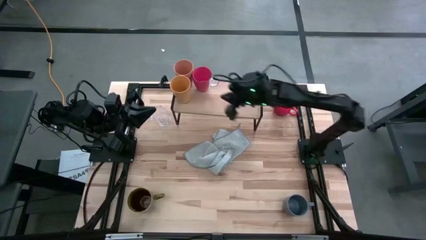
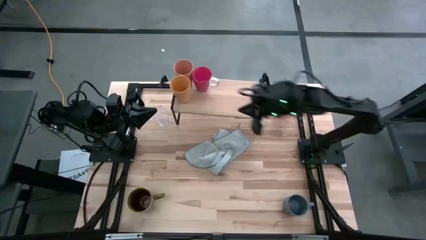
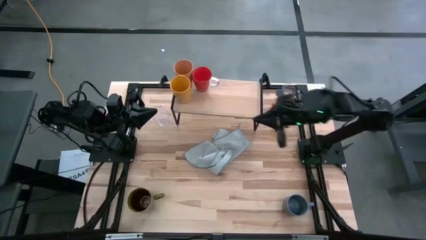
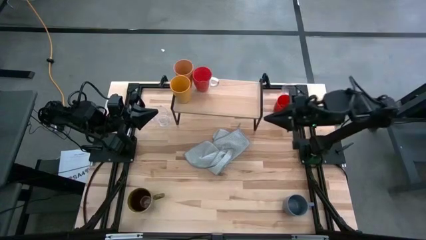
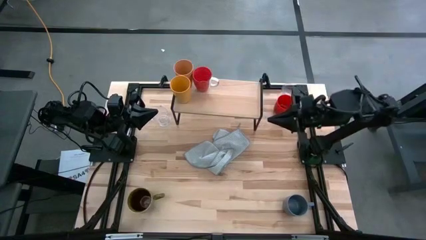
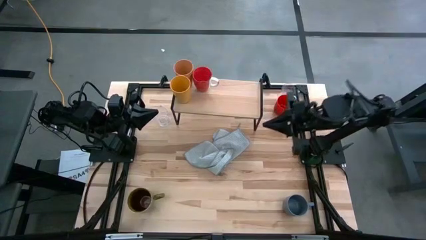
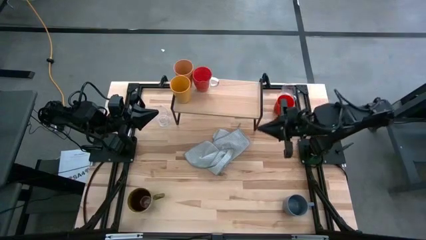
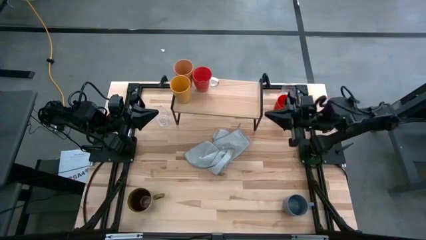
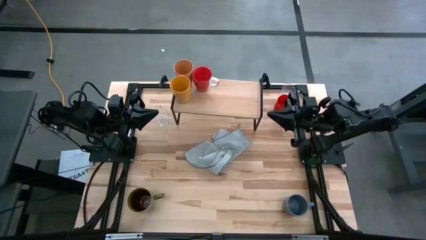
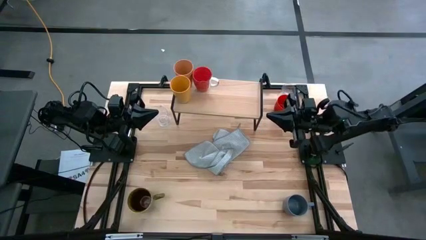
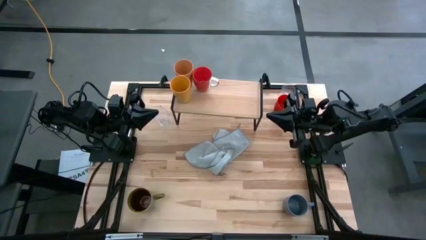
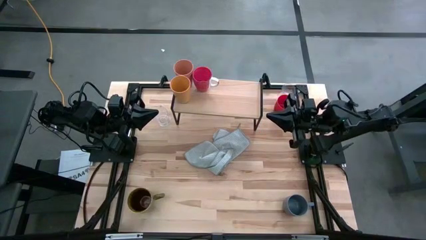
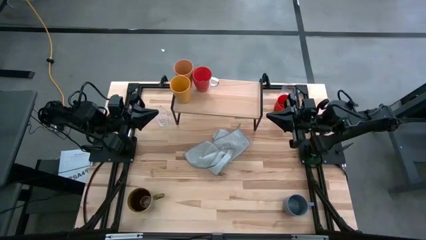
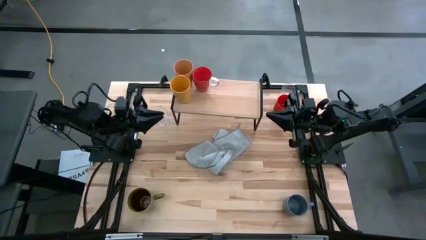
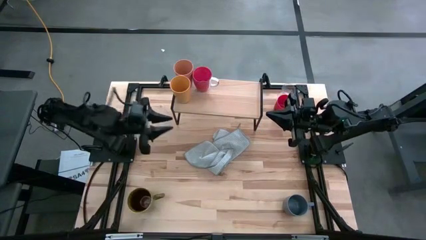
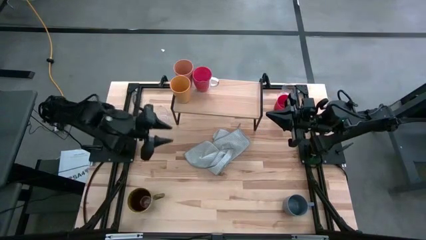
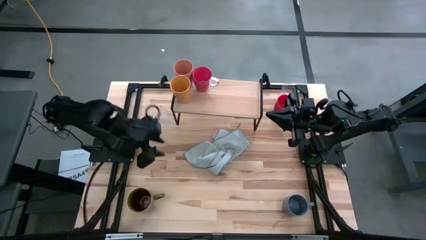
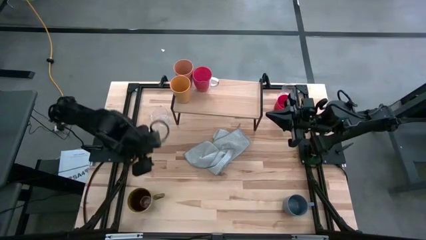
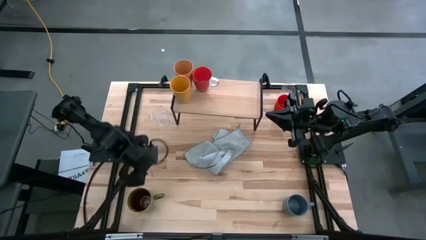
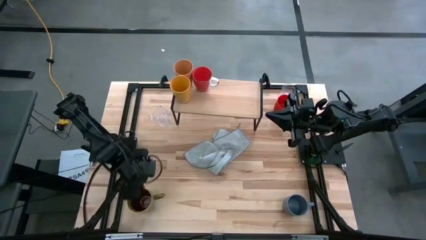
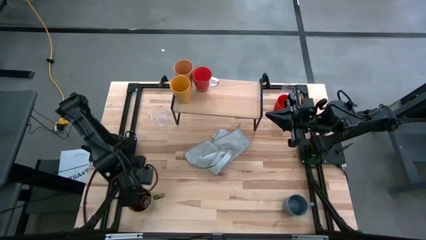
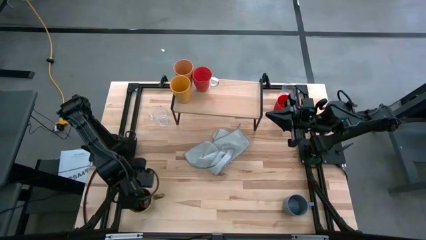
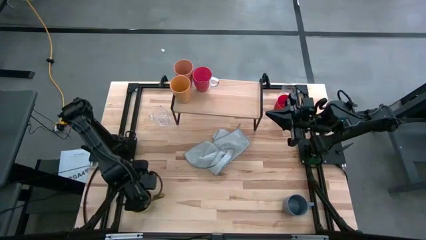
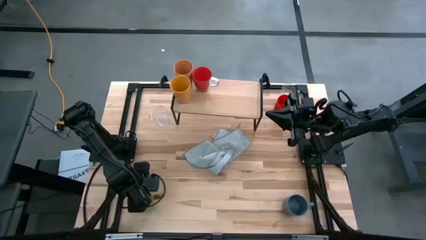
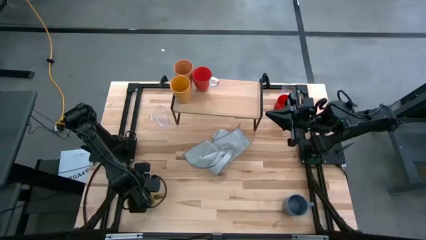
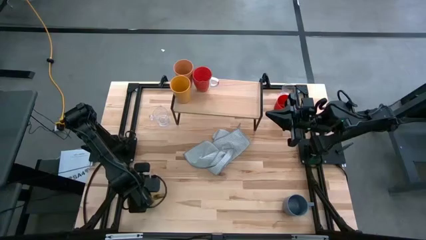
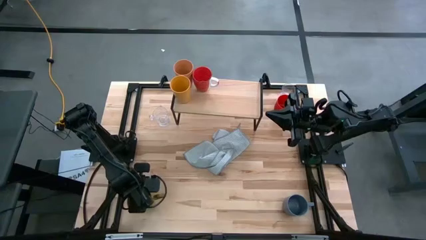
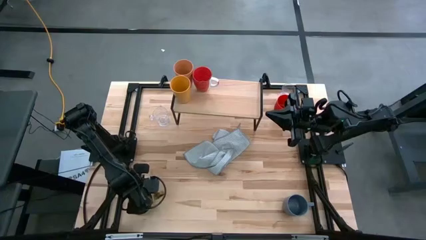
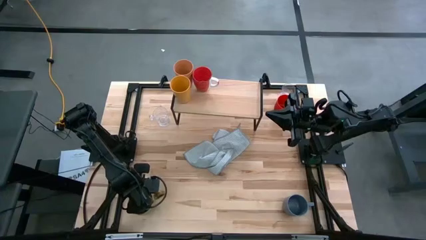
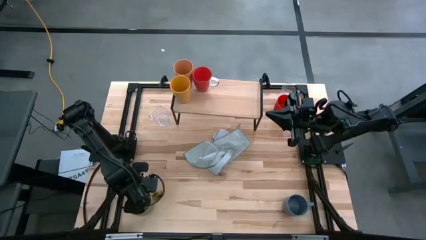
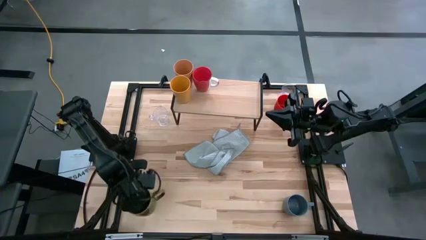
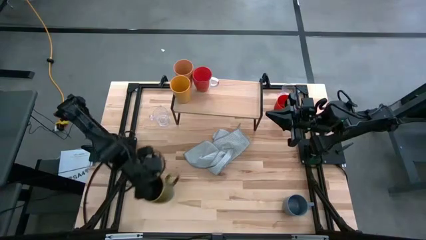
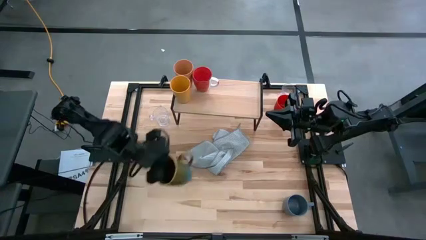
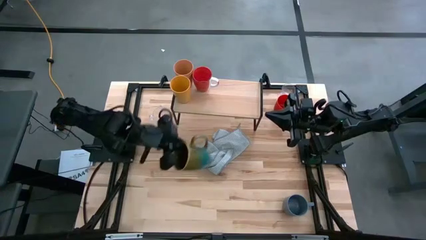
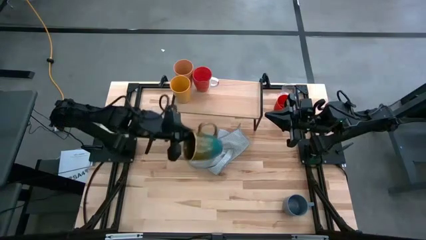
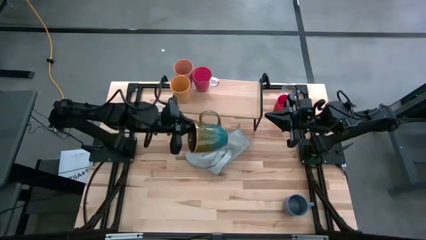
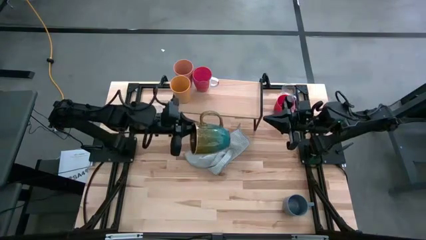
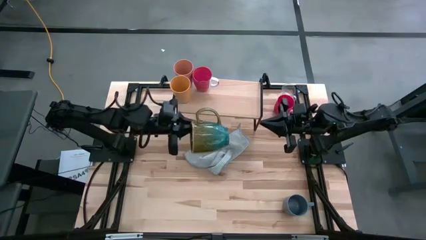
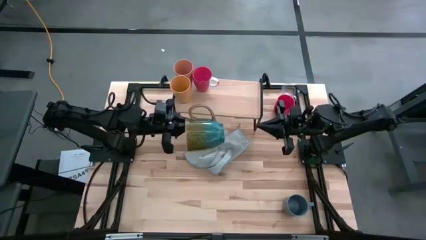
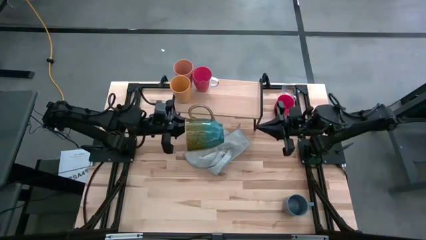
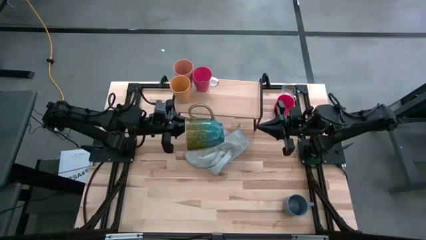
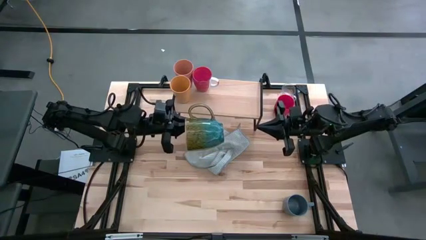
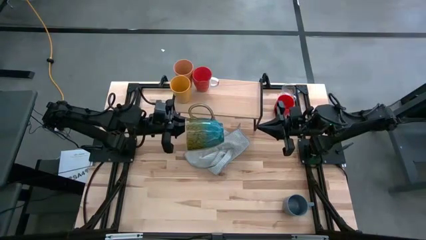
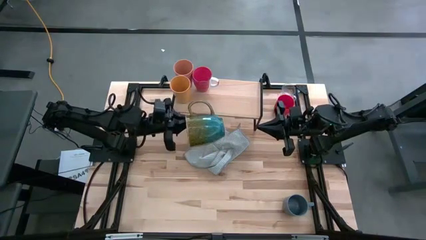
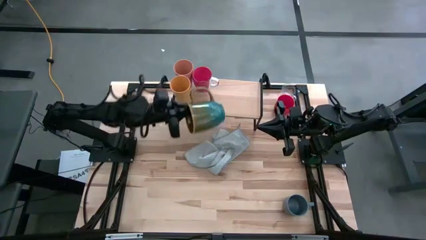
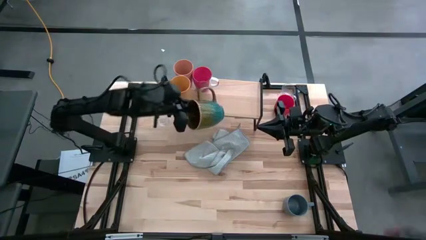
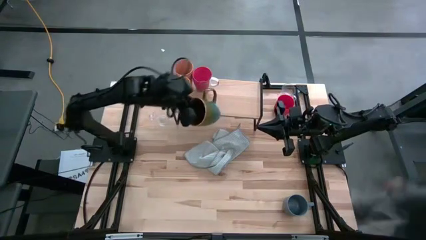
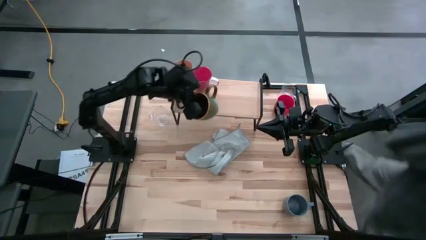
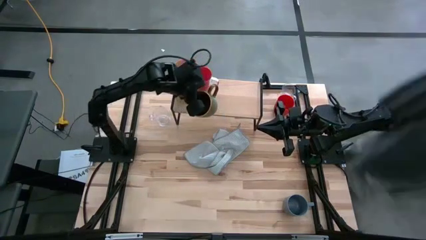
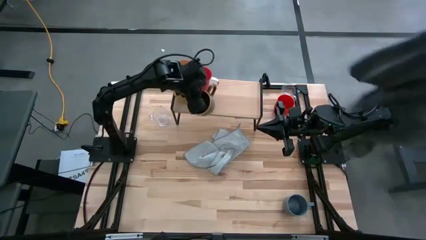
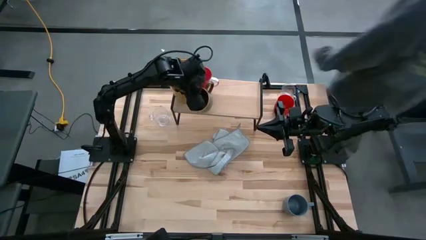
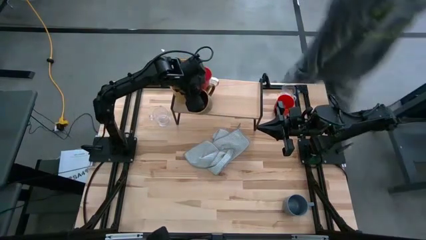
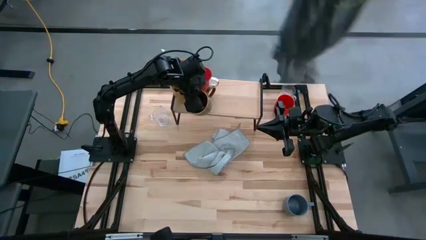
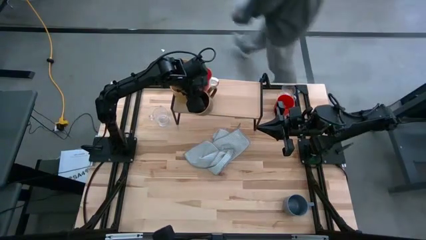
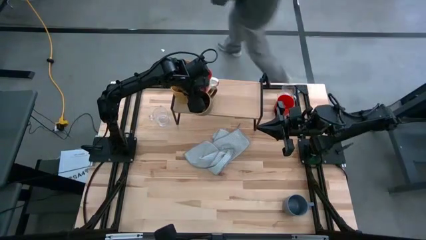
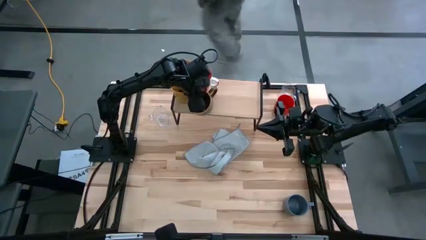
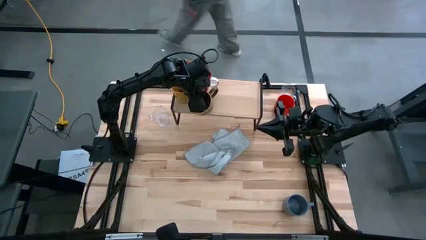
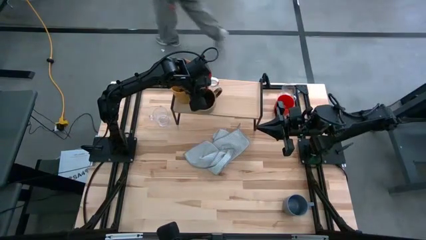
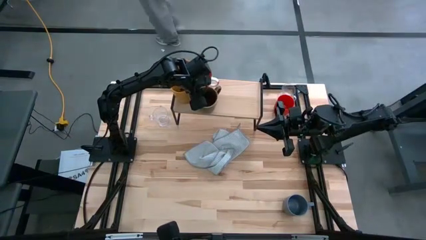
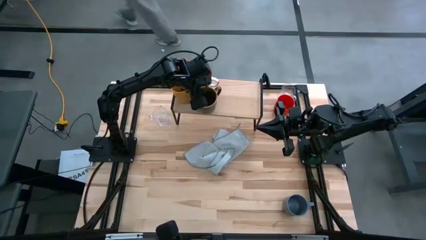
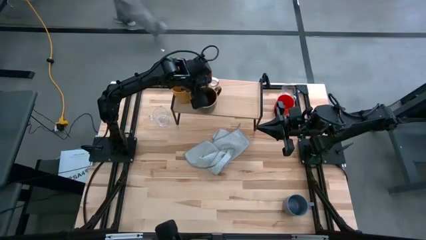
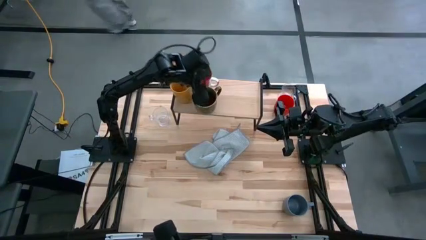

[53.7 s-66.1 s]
Task: Stack small to large cups/mugs on shelf
Put the green mug on the shelf

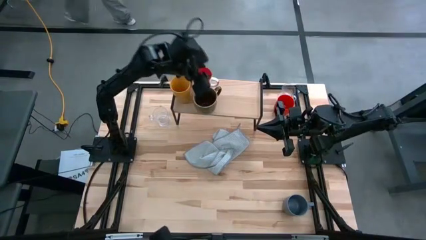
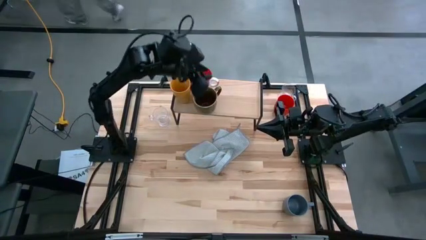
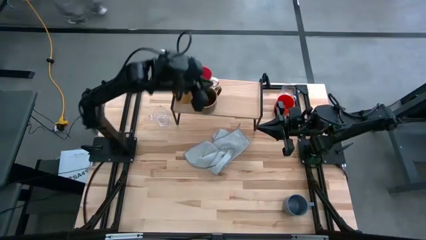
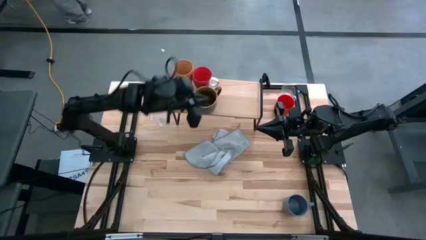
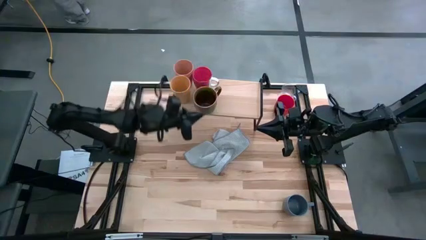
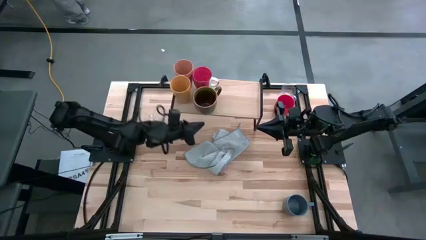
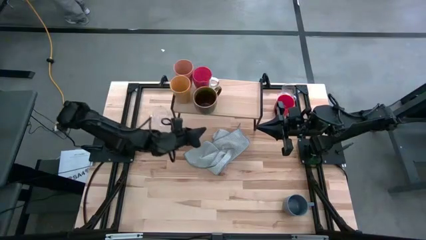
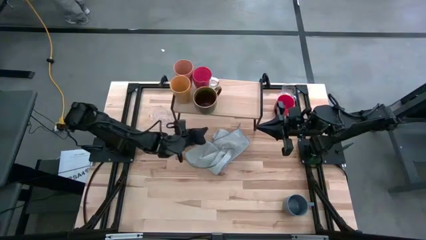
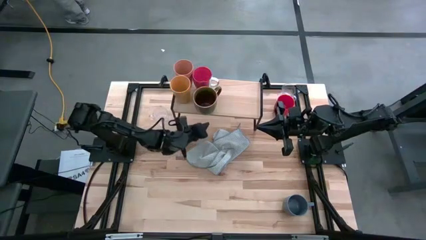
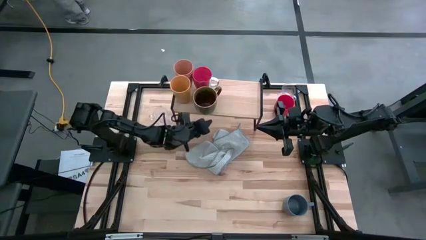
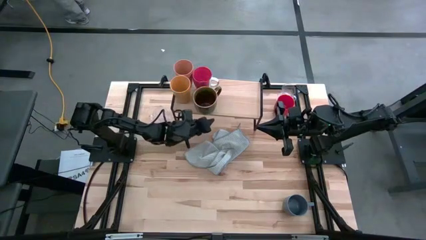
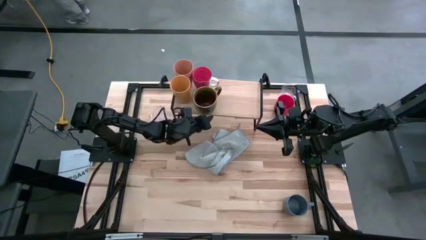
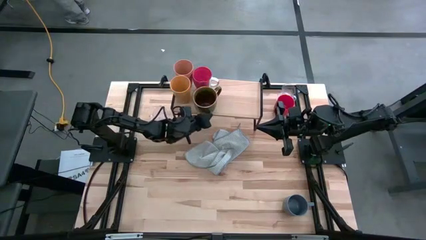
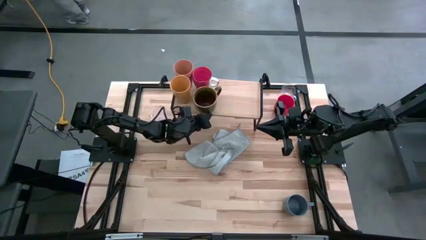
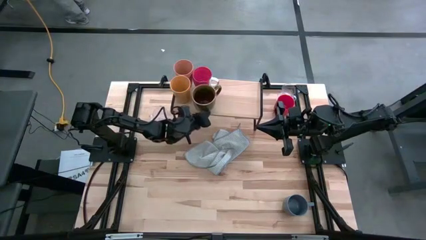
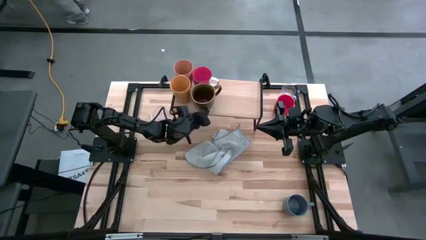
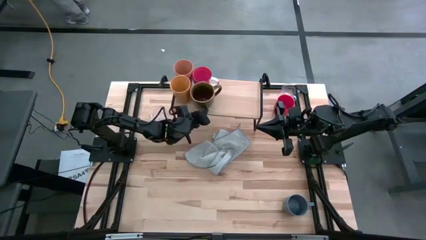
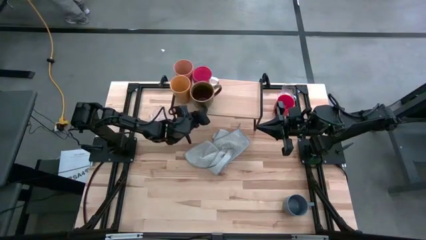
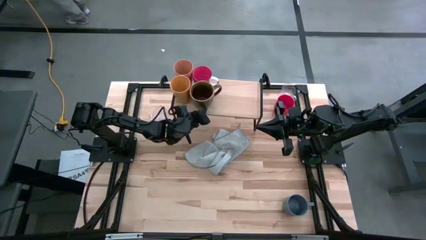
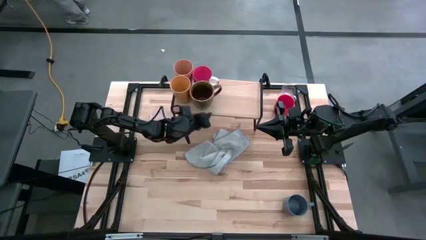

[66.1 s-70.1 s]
Adjust the green mug on the shelf
